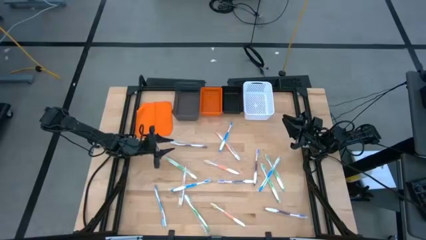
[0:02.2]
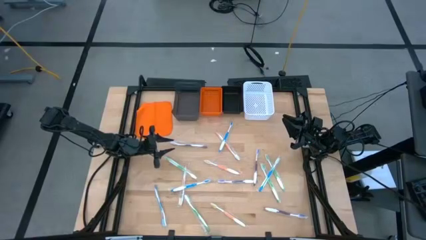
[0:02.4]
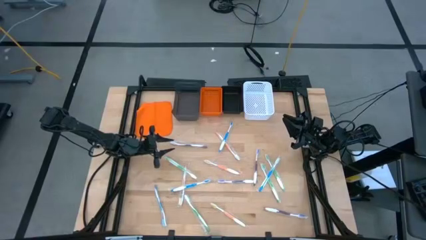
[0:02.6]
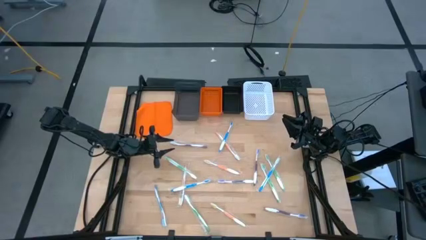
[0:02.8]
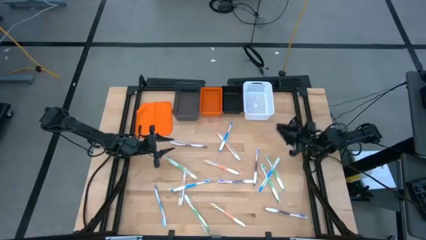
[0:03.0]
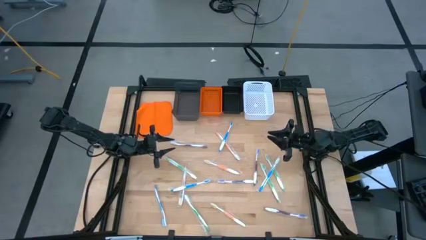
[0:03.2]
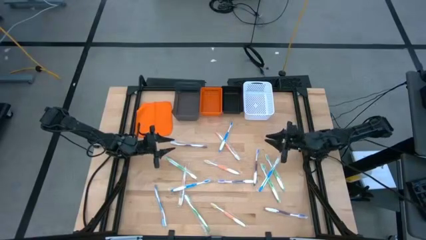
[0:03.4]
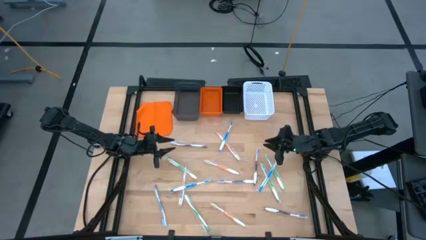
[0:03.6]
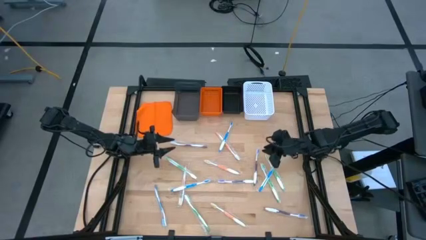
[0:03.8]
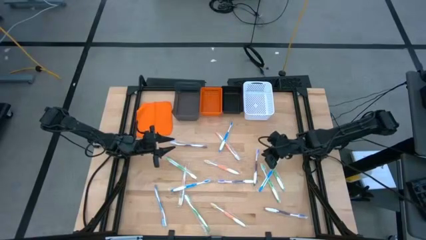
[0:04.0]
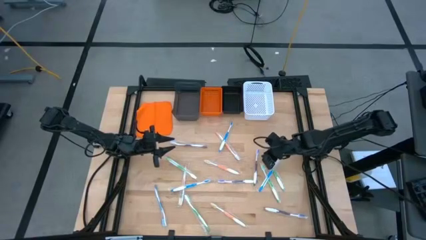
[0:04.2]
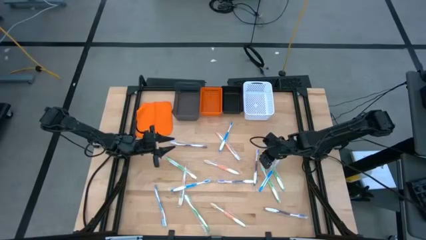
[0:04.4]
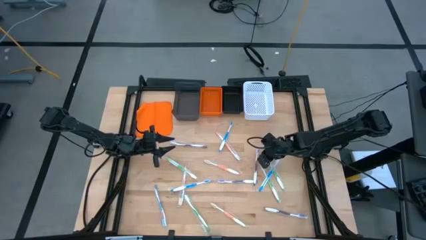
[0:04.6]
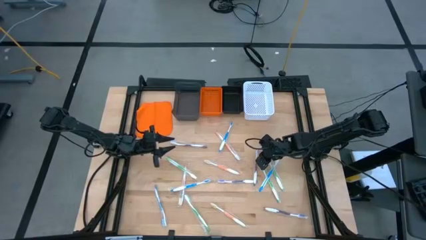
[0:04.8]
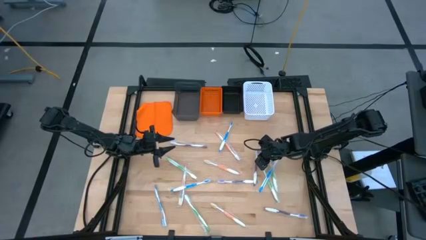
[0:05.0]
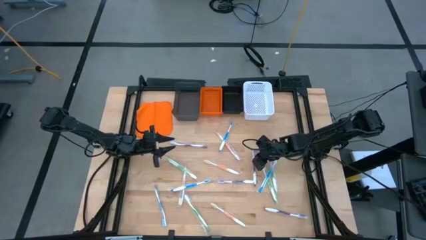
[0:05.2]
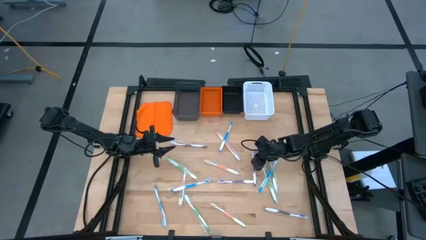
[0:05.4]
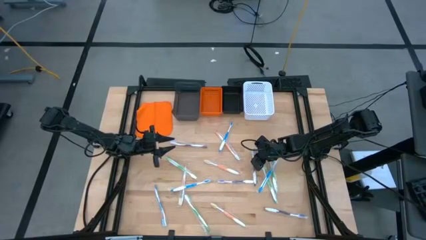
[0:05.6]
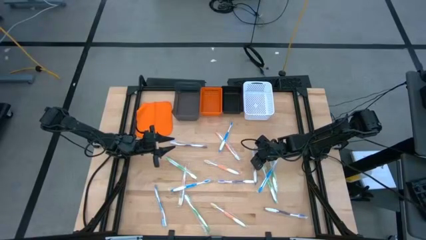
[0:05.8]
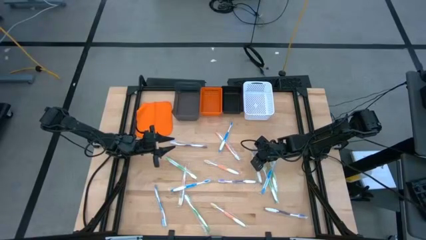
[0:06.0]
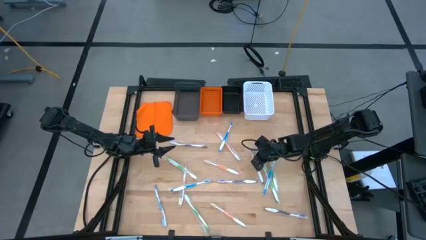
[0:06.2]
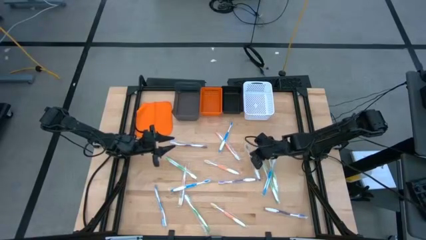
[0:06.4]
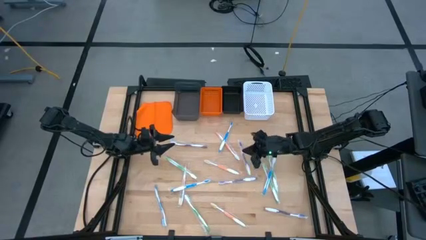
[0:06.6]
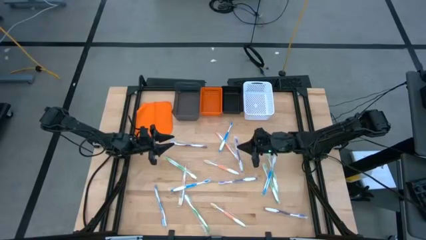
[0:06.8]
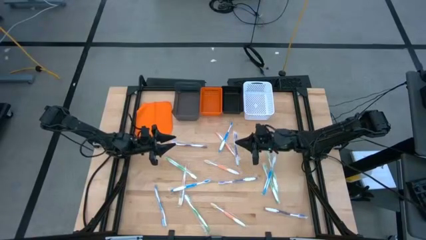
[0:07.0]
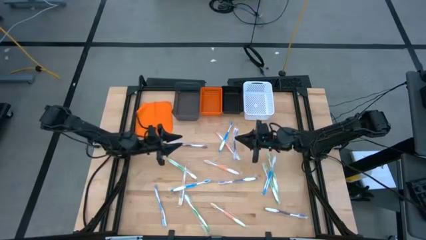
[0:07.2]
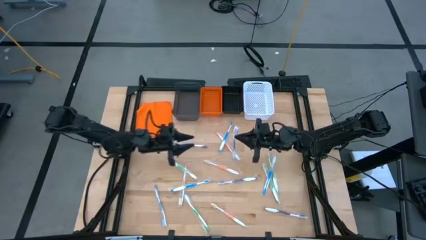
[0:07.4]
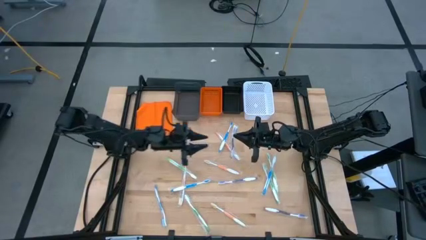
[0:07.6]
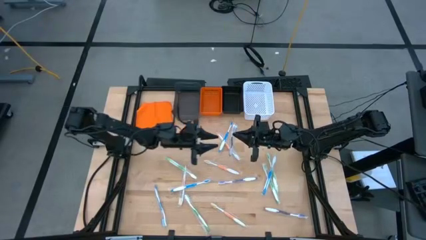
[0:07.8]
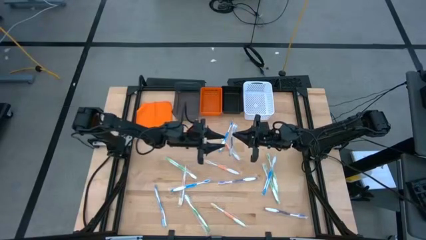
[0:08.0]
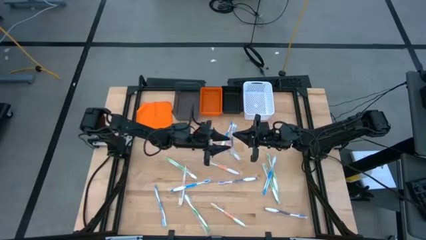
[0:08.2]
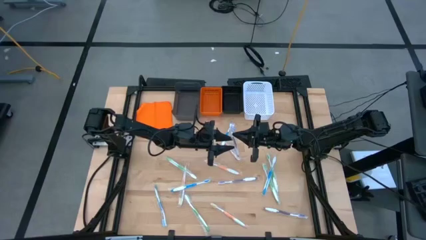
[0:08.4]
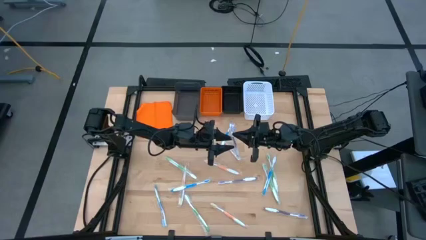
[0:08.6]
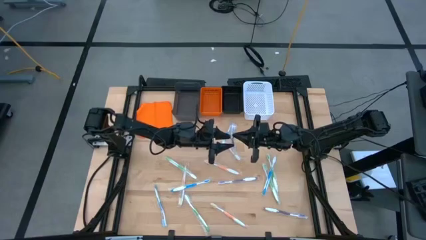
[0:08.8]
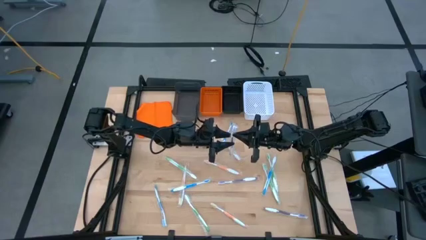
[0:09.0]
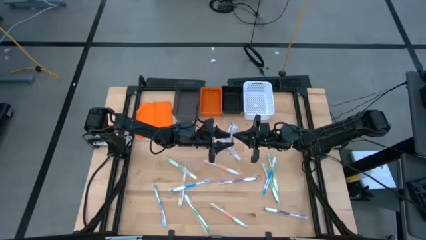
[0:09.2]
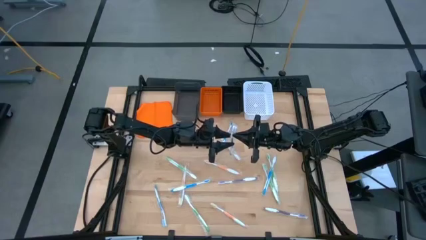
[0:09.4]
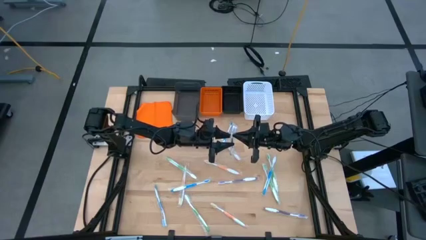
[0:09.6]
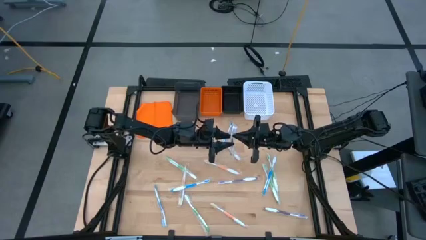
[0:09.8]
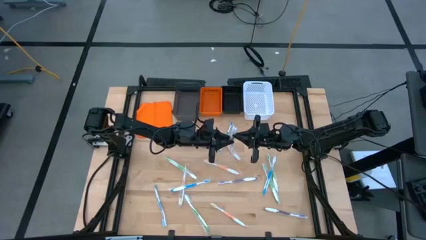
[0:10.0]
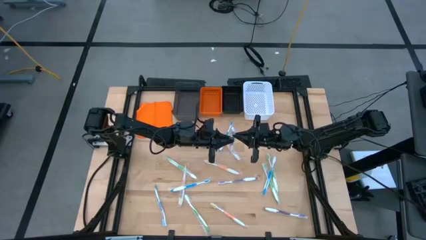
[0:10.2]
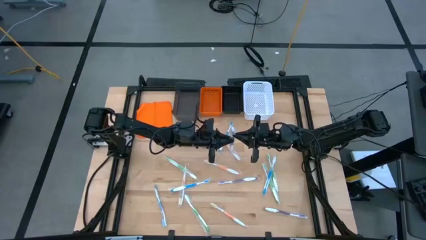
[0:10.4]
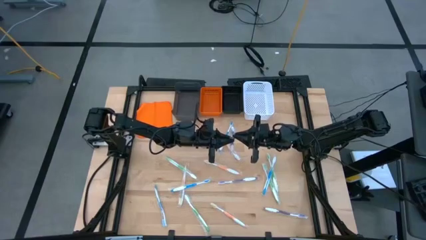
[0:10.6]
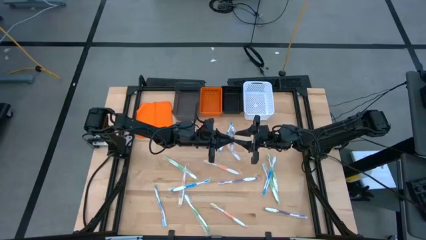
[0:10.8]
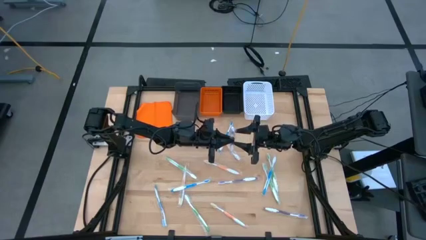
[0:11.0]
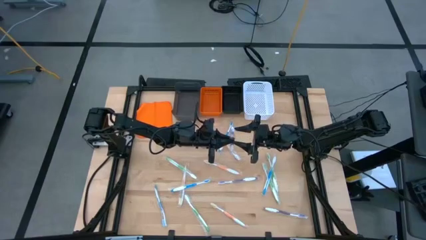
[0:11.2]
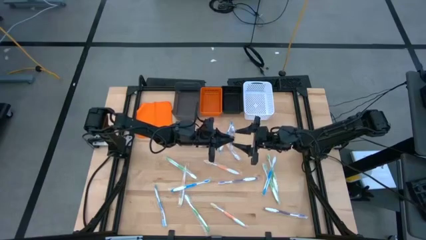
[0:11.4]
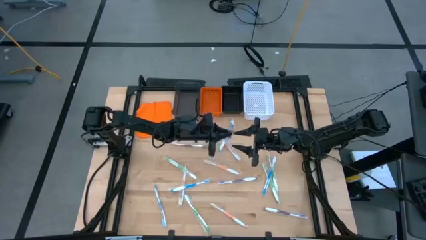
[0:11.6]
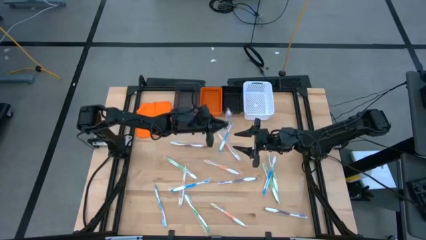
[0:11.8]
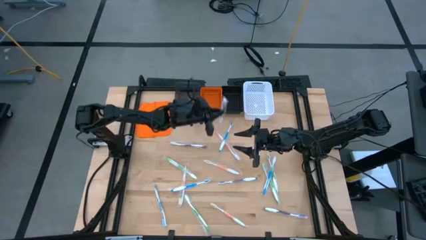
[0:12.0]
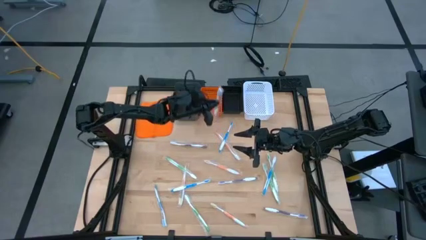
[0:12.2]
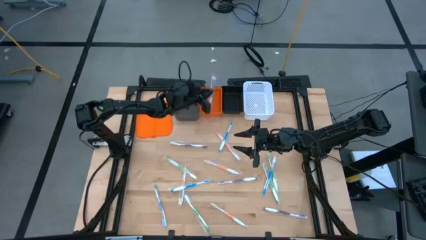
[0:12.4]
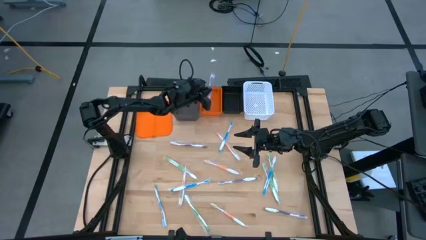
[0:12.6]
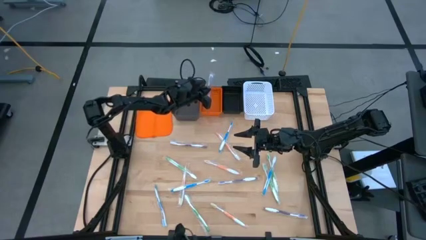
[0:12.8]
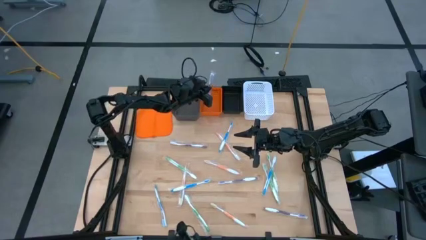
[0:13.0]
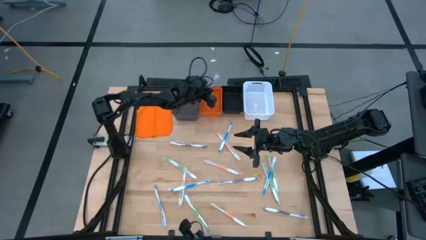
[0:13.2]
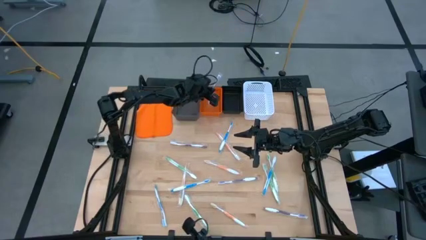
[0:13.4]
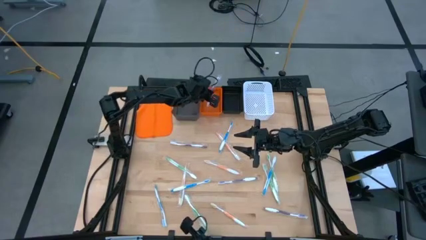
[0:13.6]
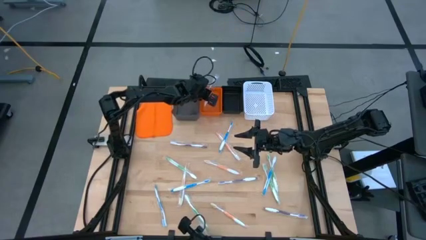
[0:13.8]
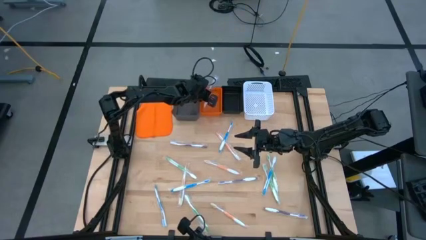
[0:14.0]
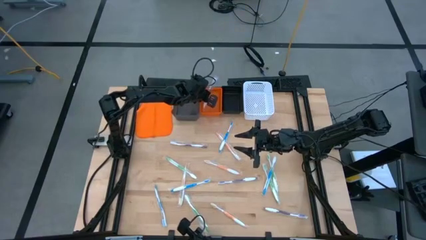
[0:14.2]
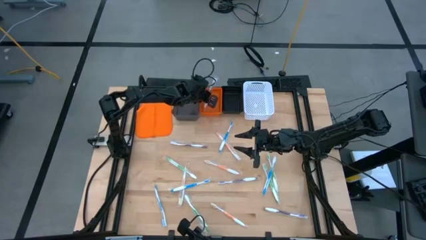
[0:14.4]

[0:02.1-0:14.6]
Task: Pick & Place Toothbrushes
Put the violet toothbrush into the orange bin
